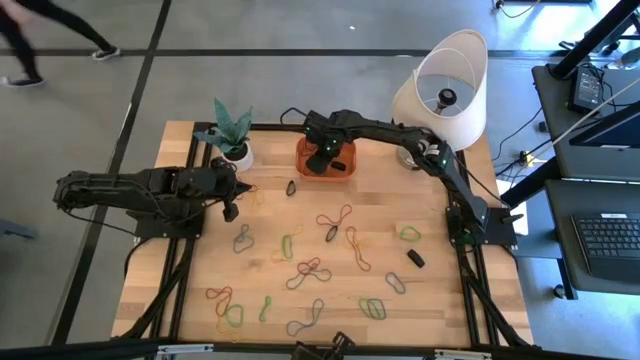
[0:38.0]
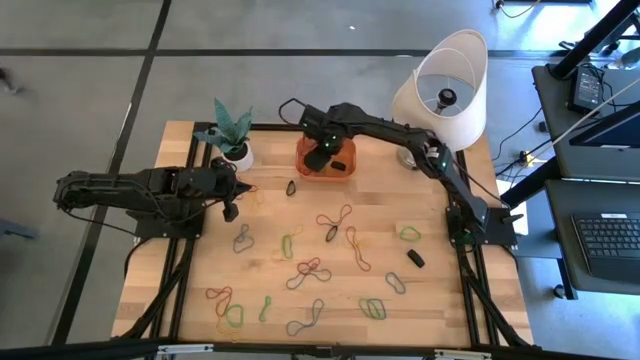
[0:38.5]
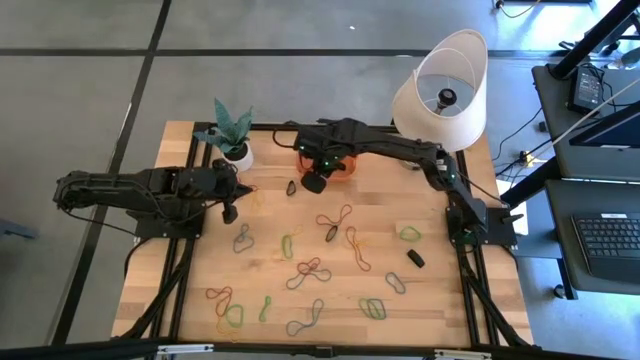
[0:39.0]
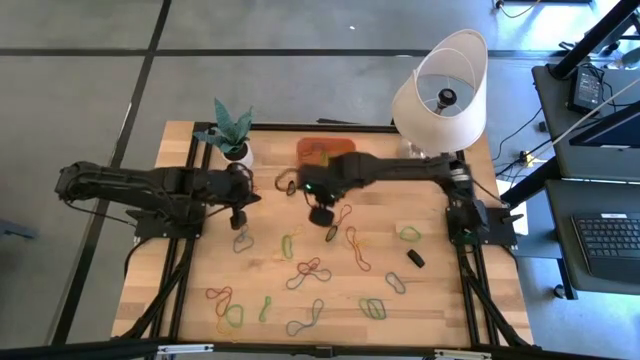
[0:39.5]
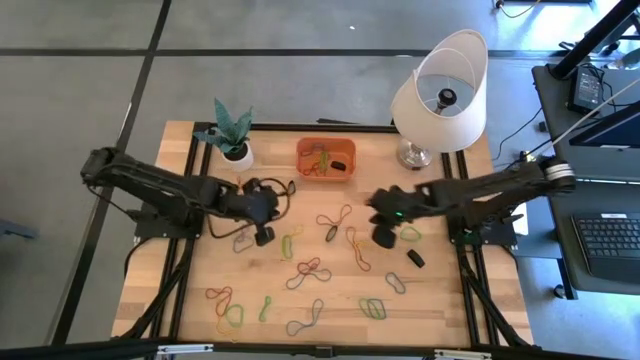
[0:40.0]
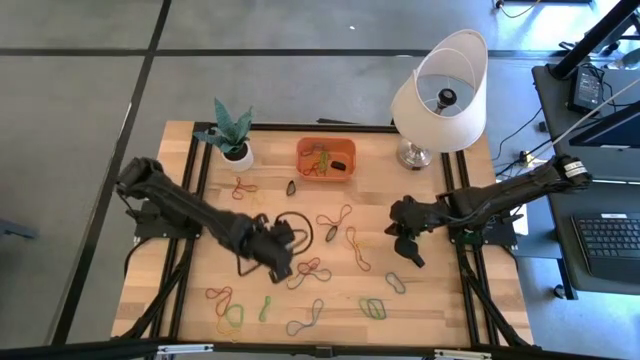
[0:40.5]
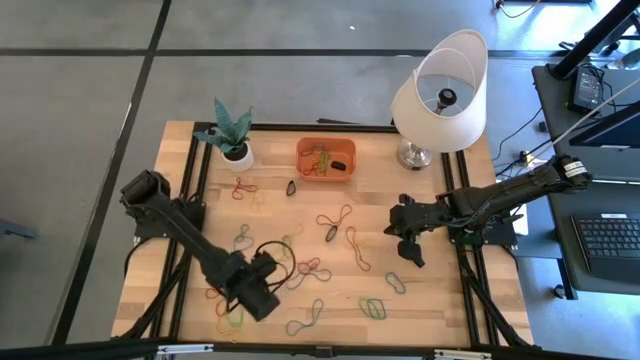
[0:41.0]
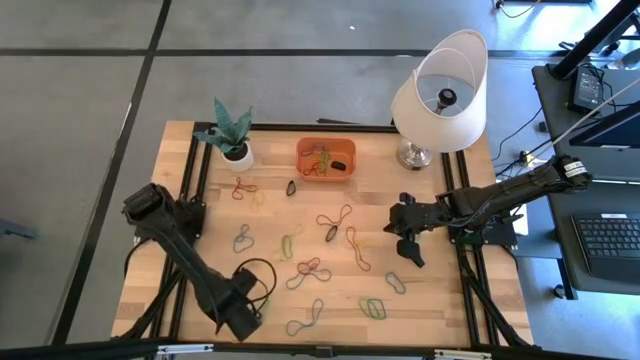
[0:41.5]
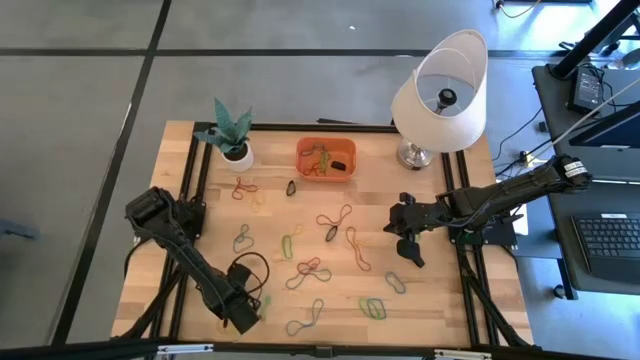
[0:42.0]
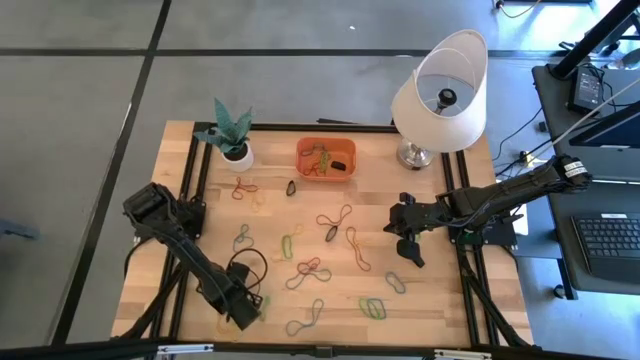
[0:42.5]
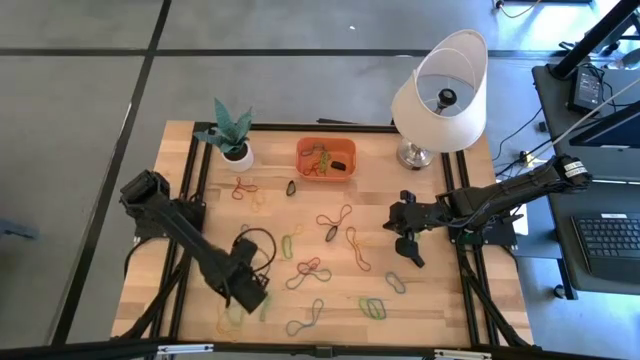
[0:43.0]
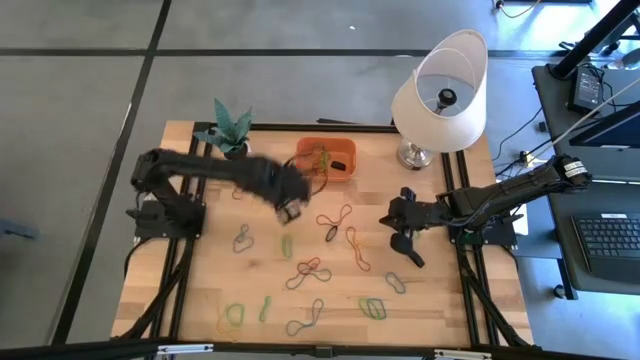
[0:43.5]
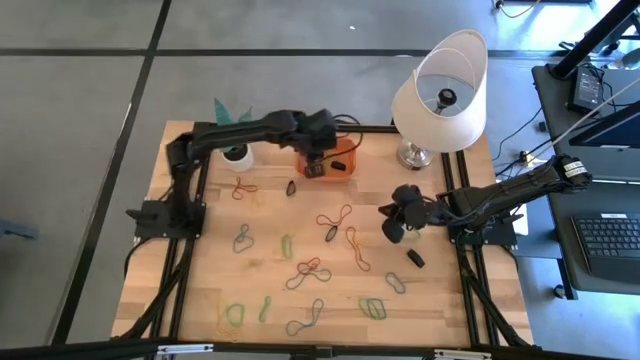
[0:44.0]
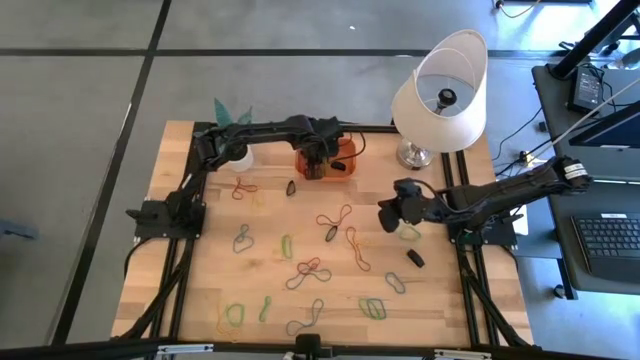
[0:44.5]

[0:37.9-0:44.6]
Task: Pick and place rubber bands into bin
Put the red rubber band into the orange bin

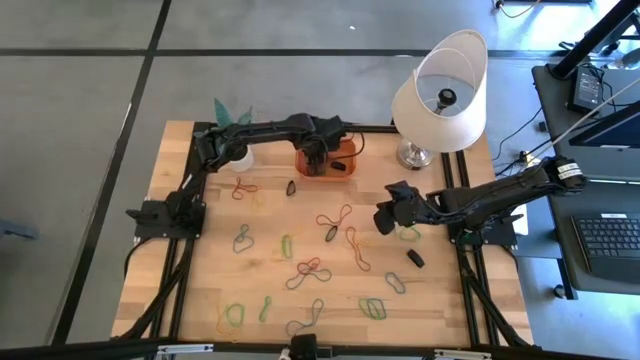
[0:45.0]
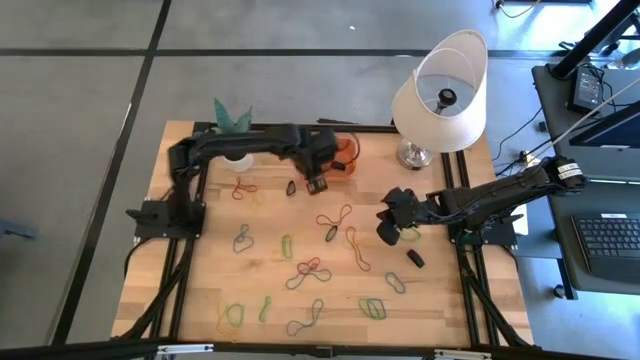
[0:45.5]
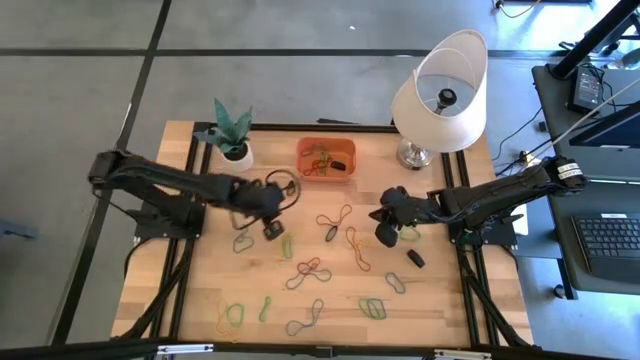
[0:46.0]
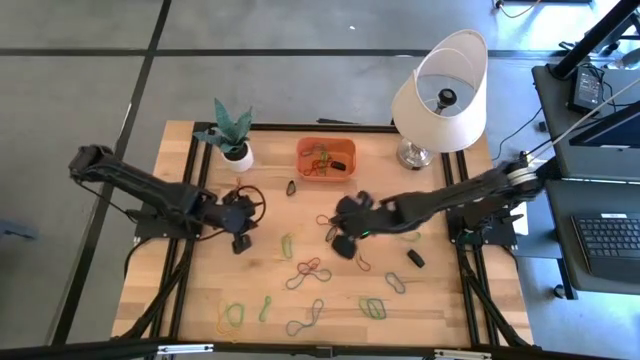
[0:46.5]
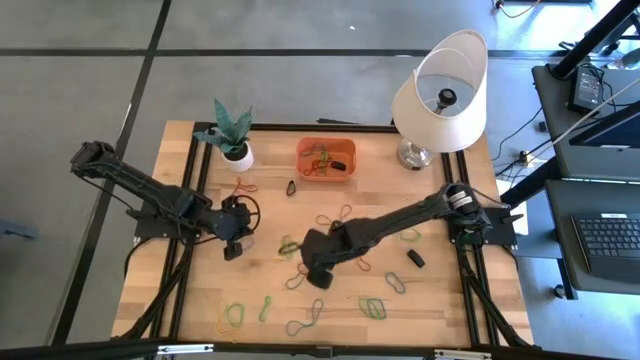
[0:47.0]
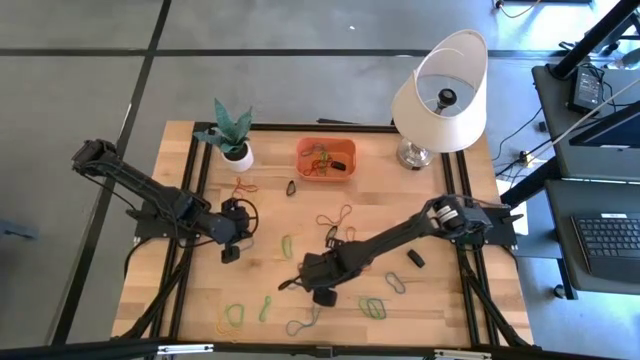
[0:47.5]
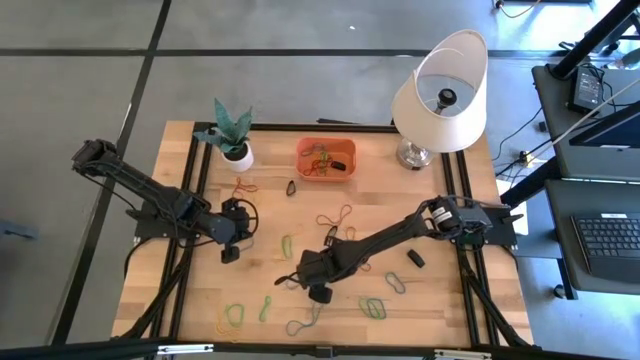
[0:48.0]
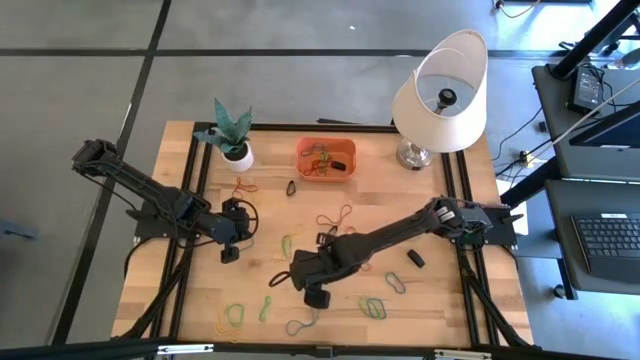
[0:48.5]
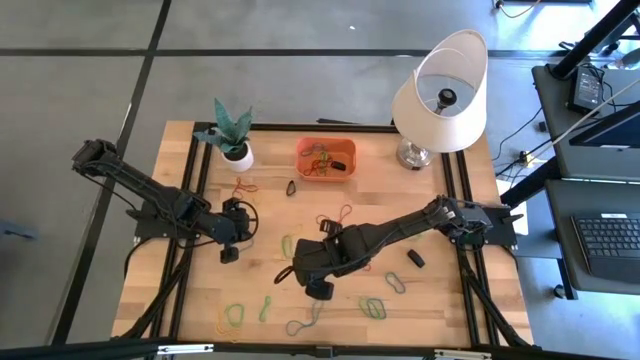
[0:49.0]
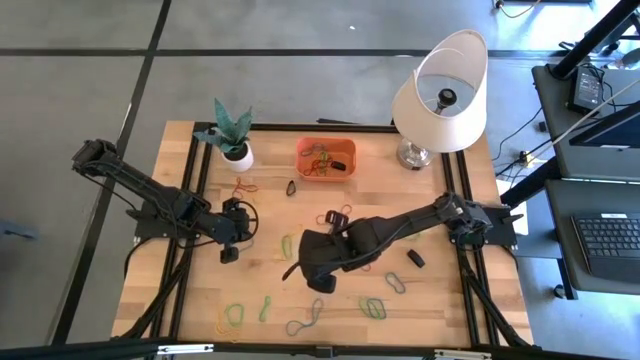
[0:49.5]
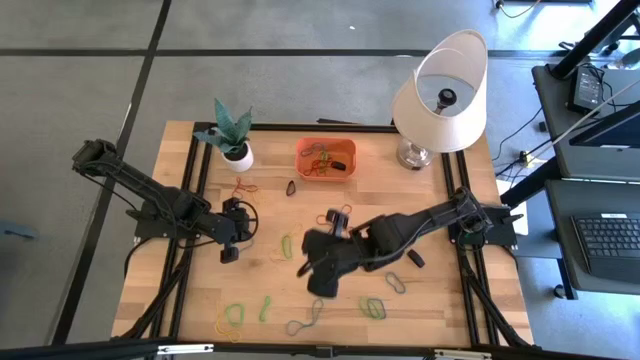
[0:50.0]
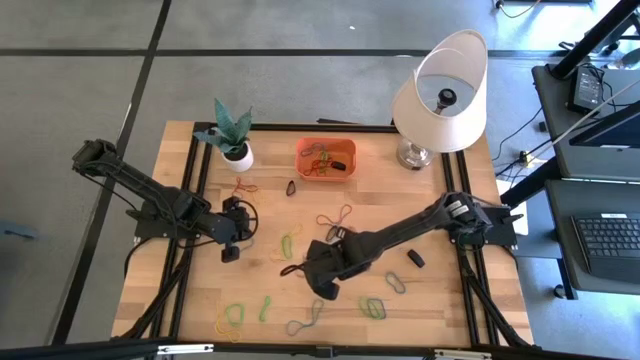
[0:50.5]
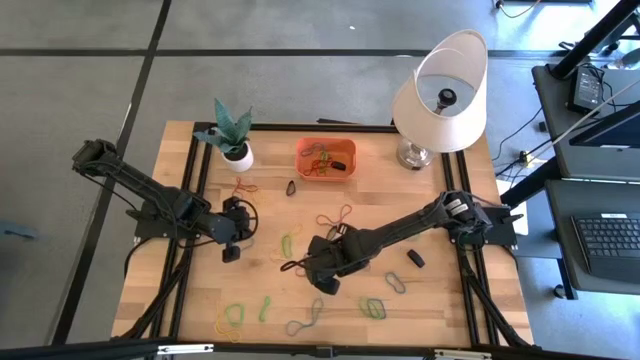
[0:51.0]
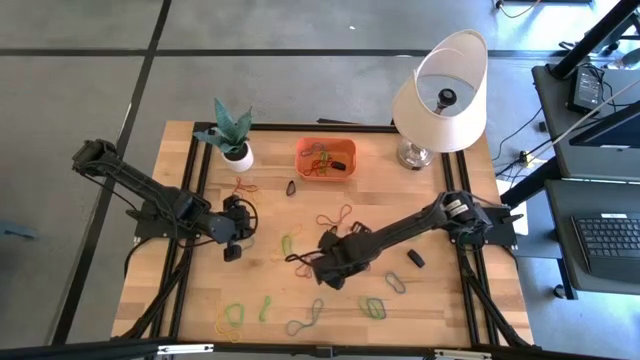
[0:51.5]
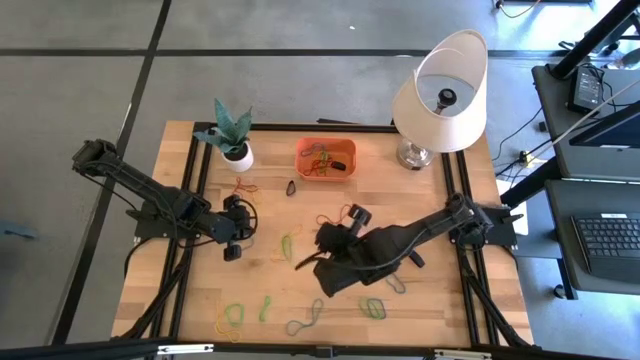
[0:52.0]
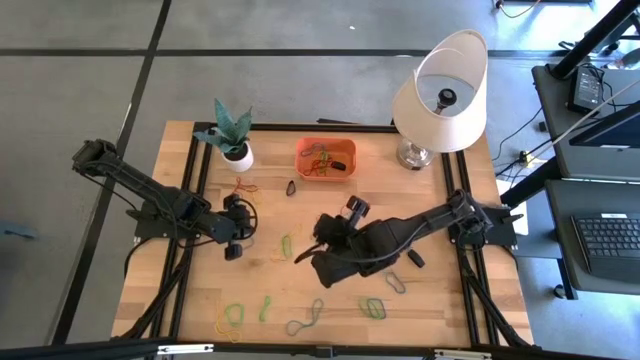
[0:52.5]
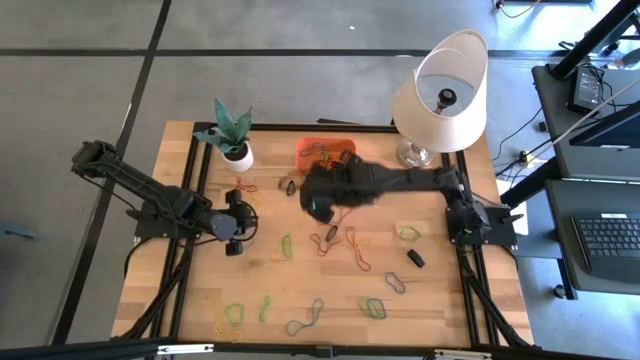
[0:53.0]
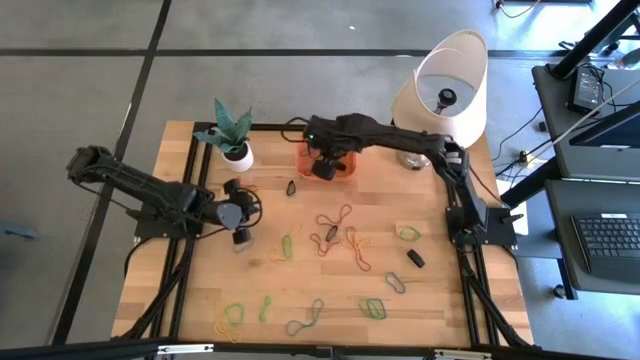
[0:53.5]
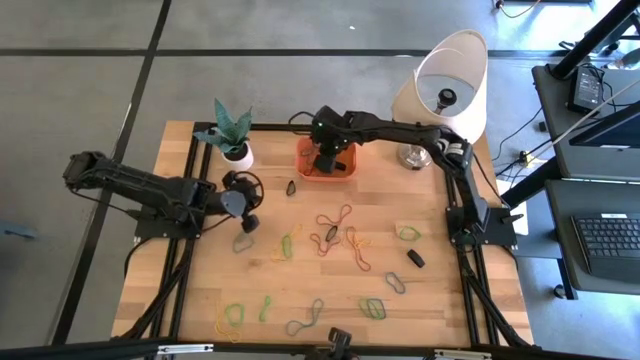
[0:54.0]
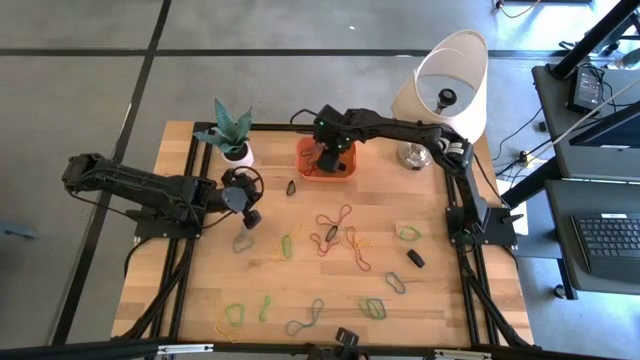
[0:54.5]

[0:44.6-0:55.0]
Put the blue rubber band into the orange bin

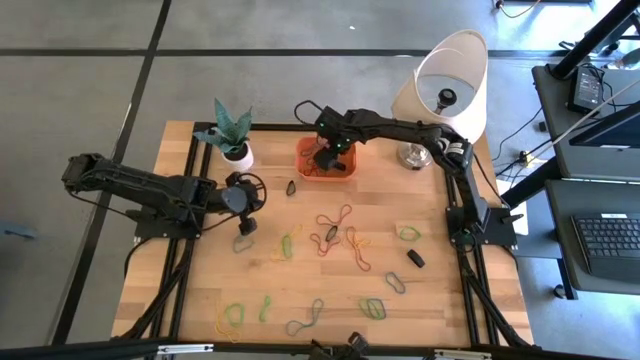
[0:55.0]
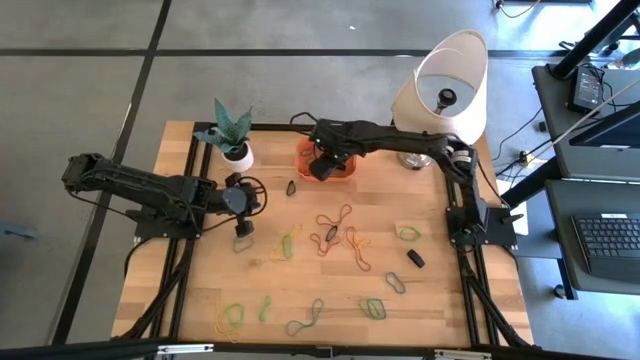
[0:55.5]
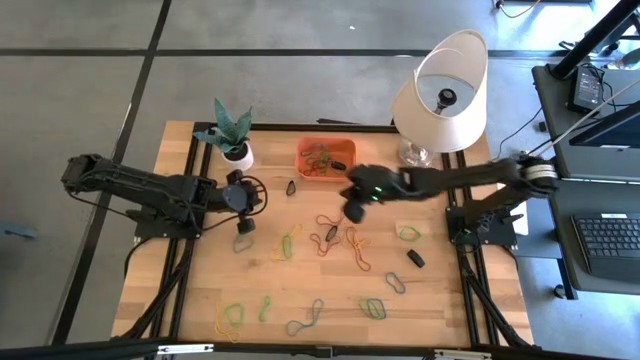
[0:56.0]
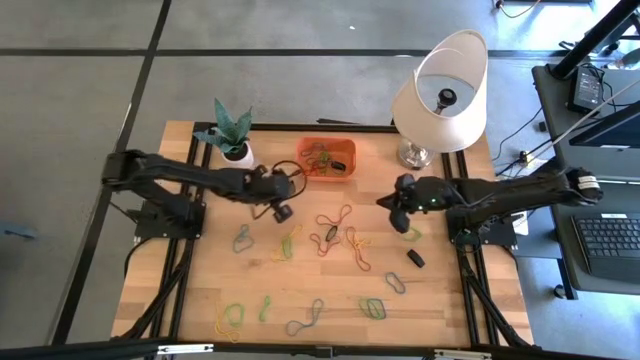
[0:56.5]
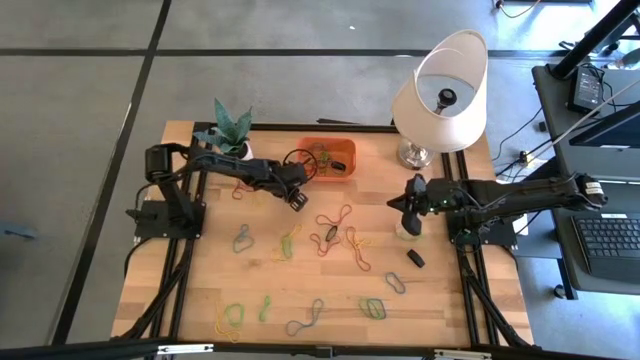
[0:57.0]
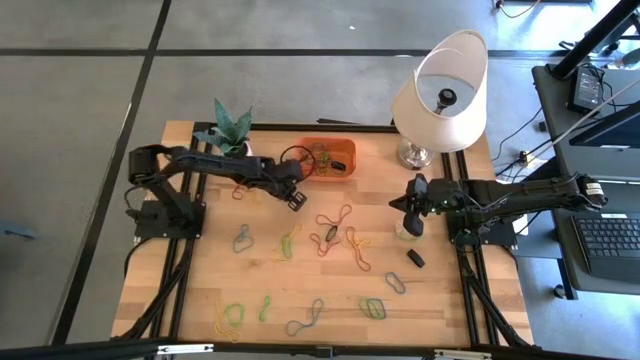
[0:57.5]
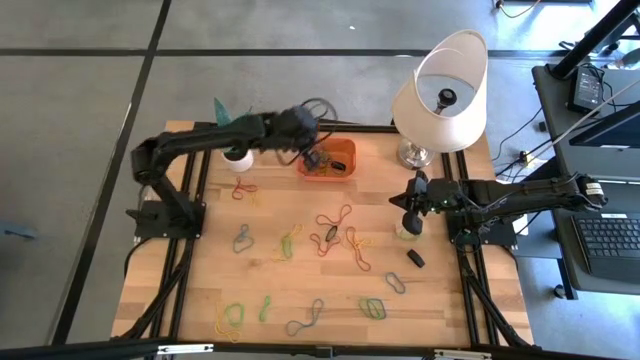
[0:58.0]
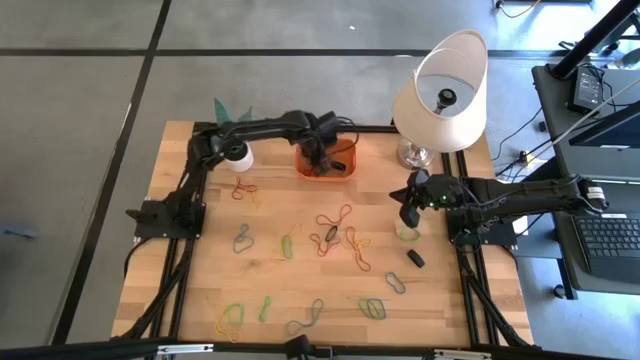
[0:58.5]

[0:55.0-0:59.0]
Put the top black rubber band into the orange bin
